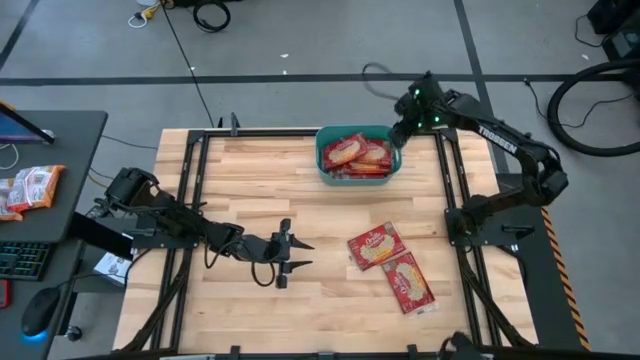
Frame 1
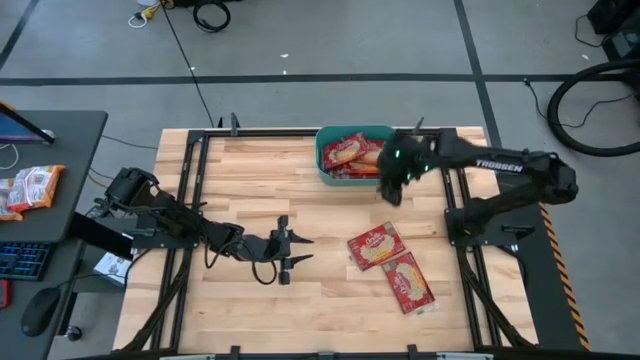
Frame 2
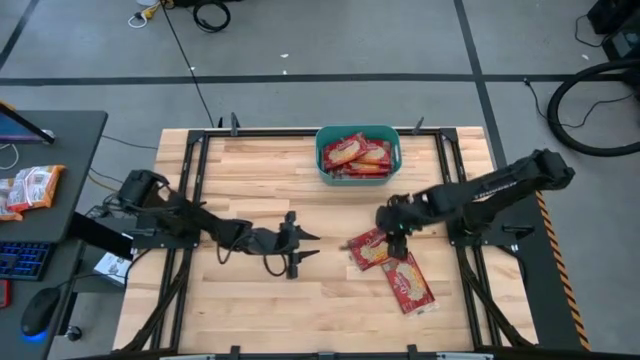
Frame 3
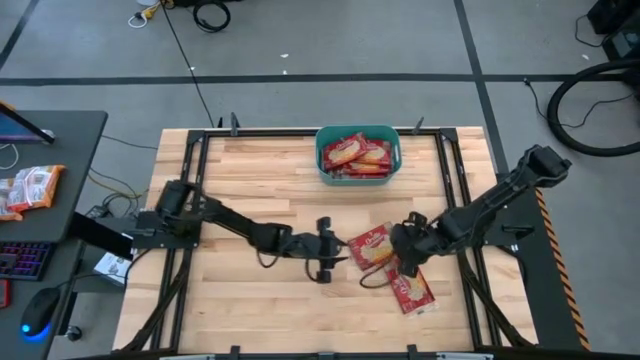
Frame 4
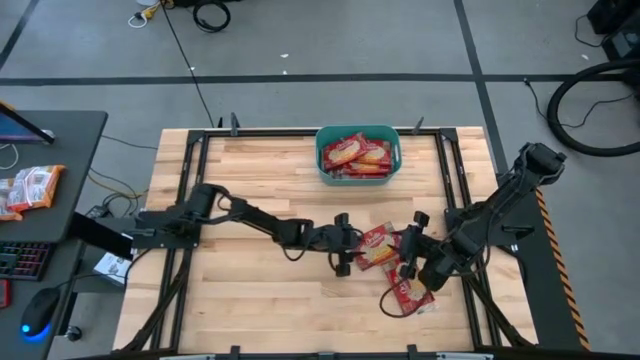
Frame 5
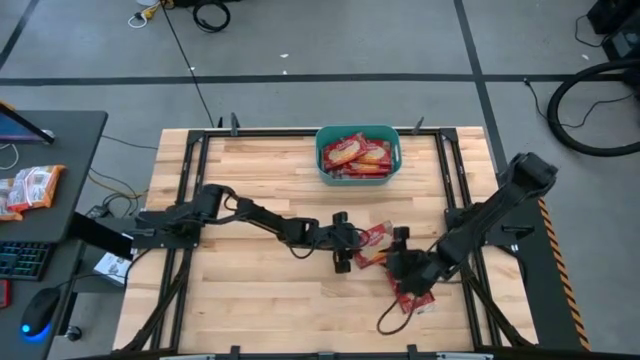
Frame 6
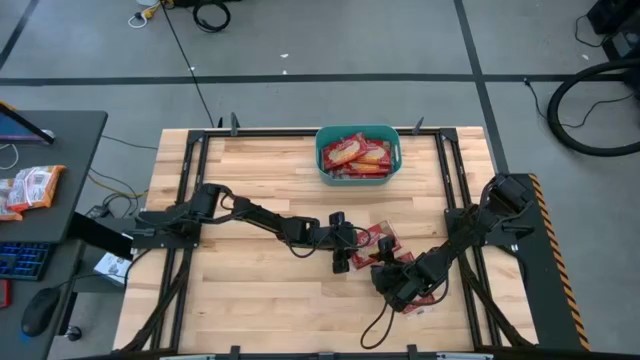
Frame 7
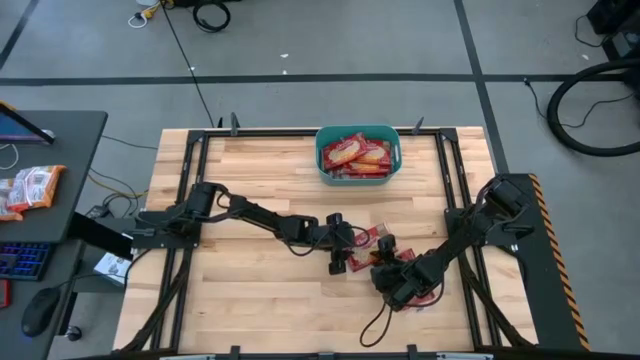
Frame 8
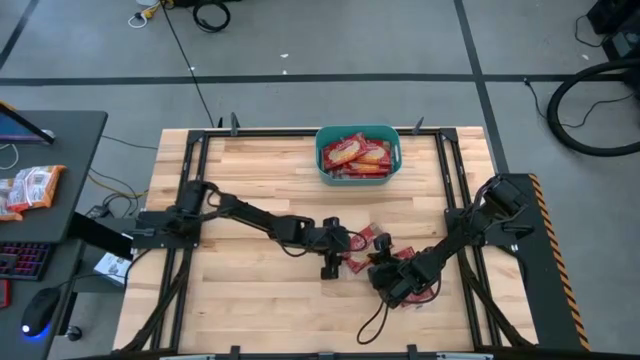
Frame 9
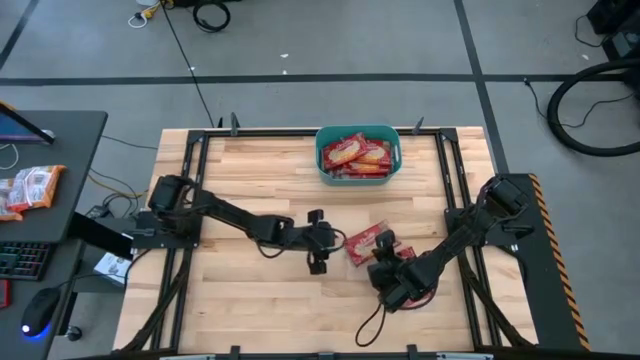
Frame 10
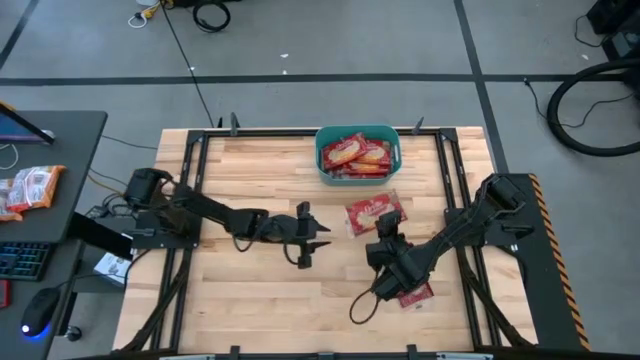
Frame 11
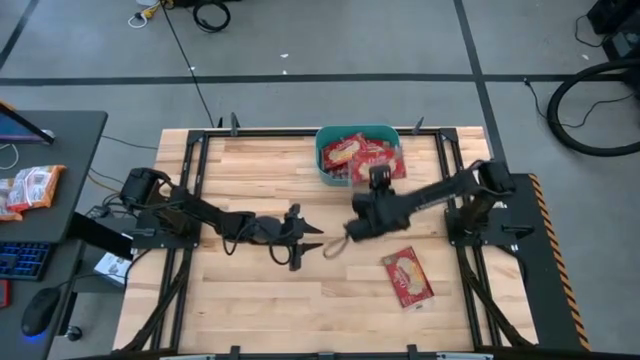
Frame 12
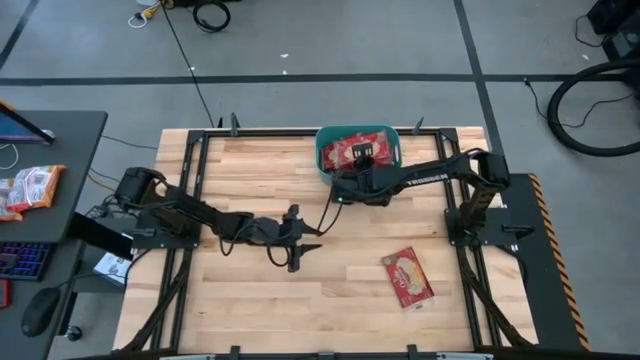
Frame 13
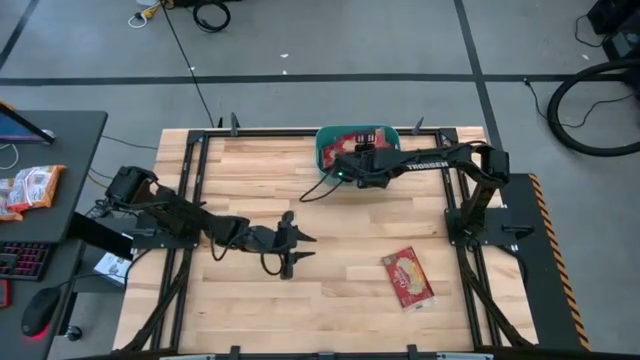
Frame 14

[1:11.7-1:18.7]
Task: Sort popcorn bags into baskets
Put the red popcorn bag into the blue bin

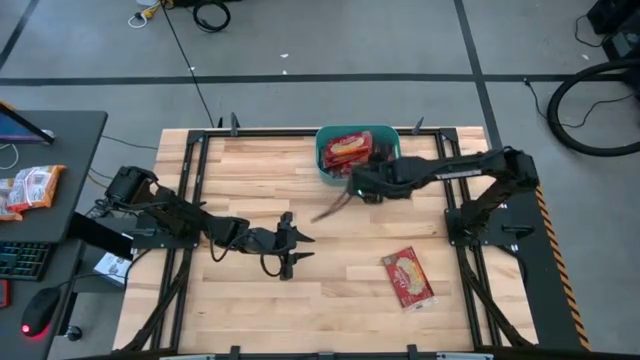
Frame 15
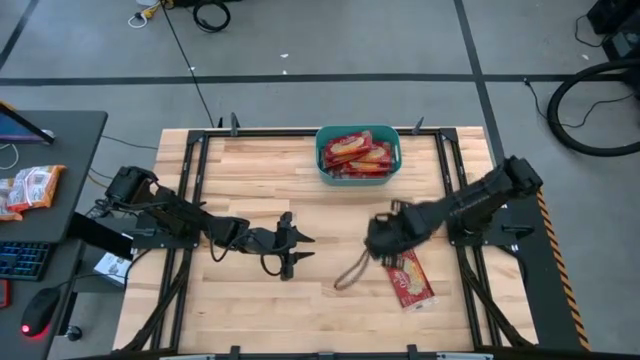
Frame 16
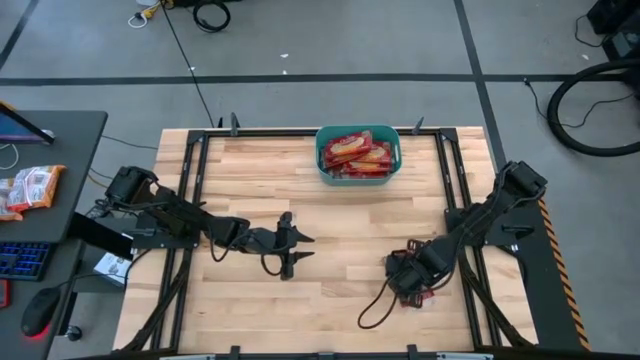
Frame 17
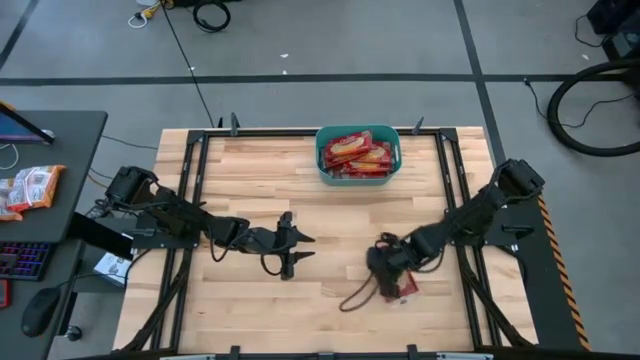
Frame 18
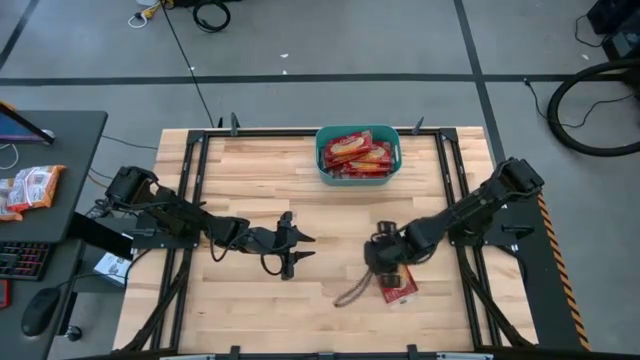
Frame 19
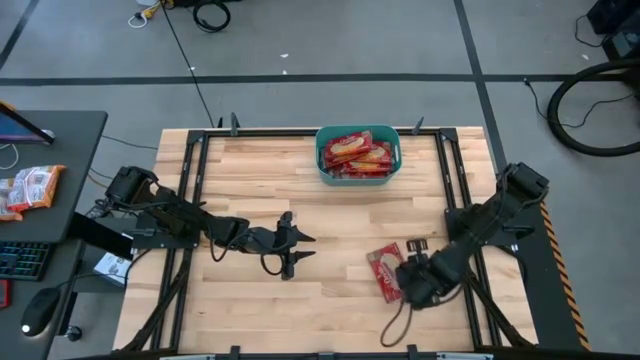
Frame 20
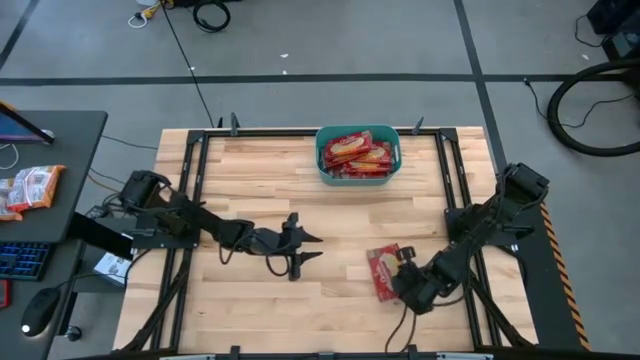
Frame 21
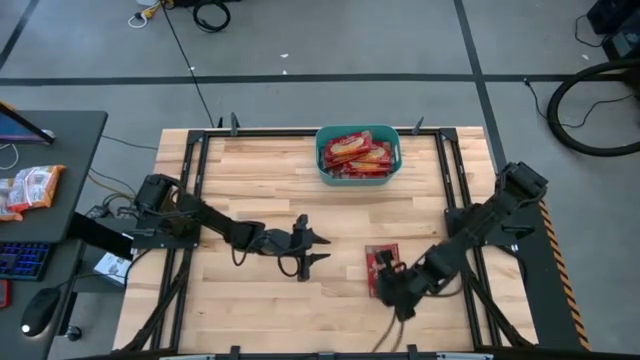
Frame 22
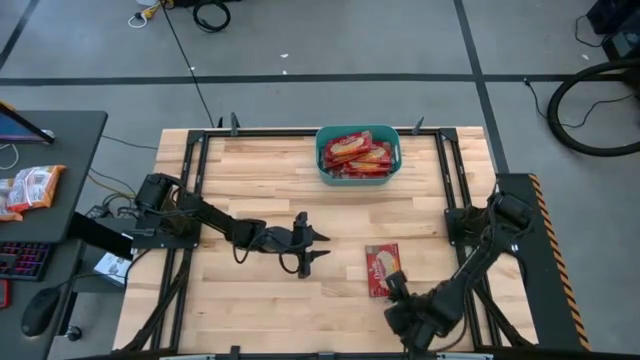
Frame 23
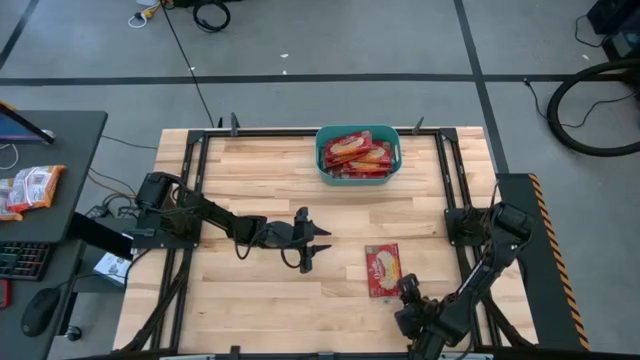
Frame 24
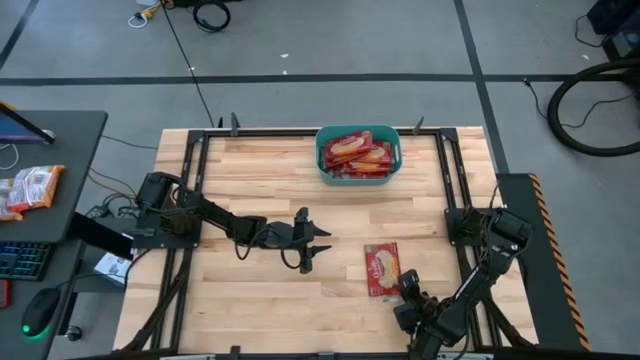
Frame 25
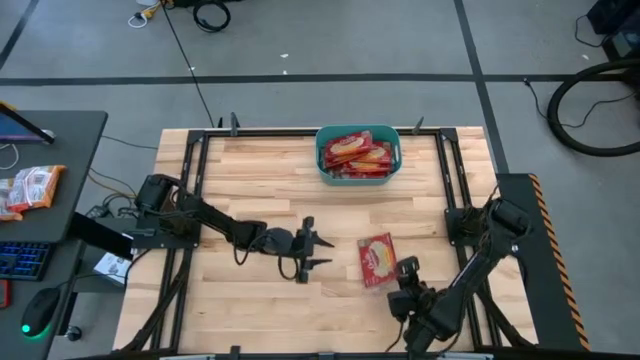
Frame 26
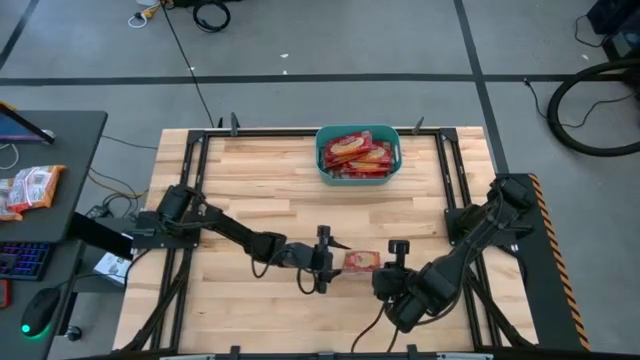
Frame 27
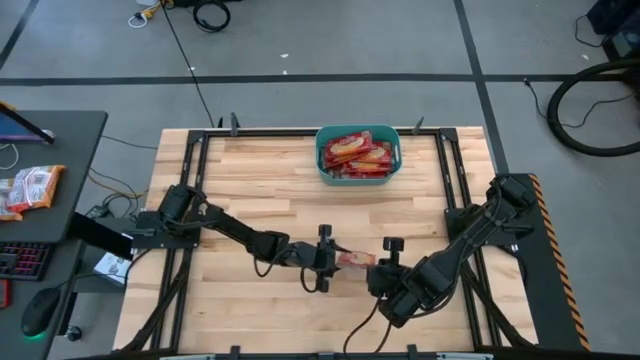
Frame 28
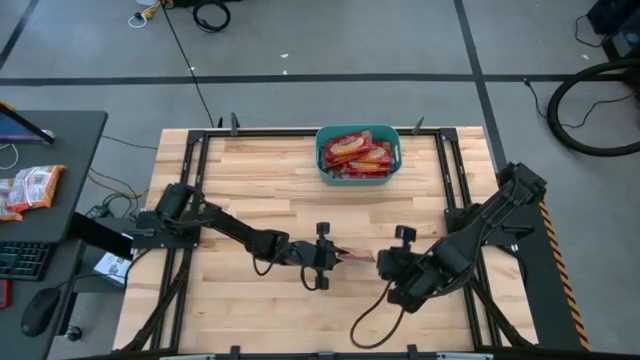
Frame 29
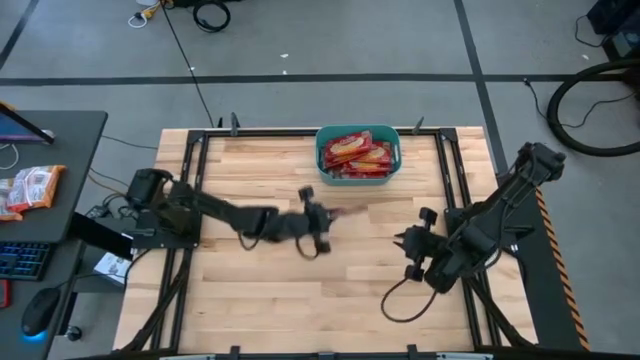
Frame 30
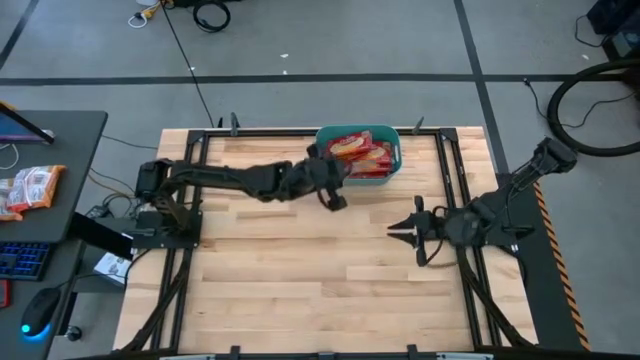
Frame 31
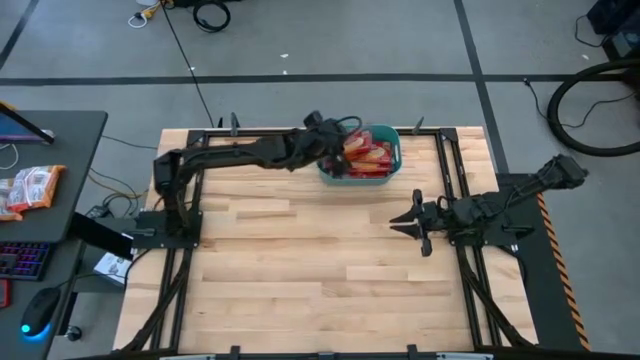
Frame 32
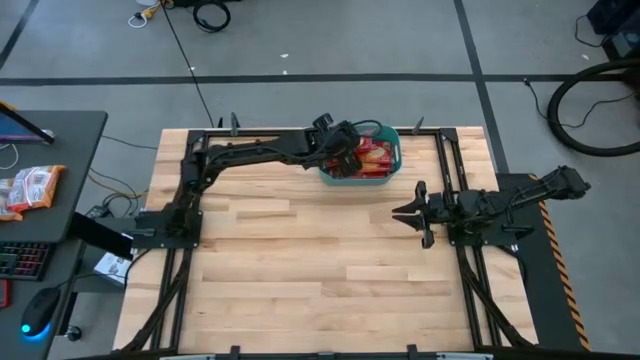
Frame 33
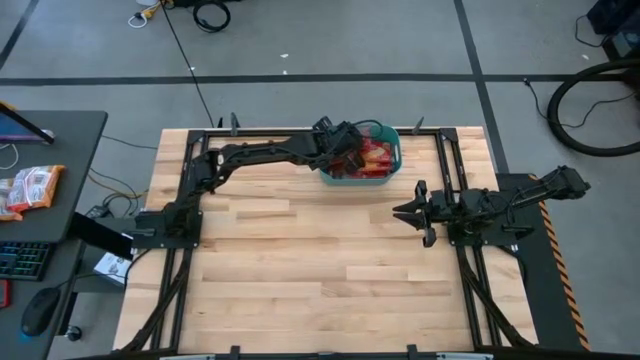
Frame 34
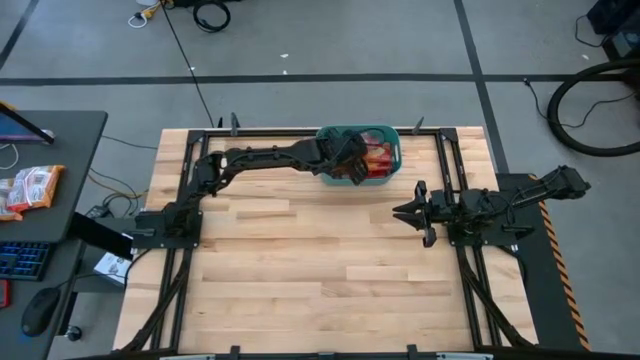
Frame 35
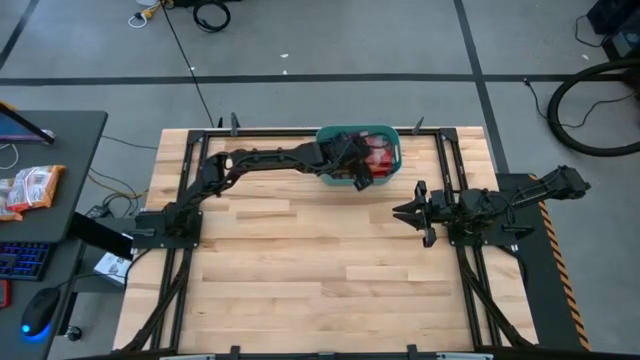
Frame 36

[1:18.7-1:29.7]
Put the red popcorn bag into the blue bin

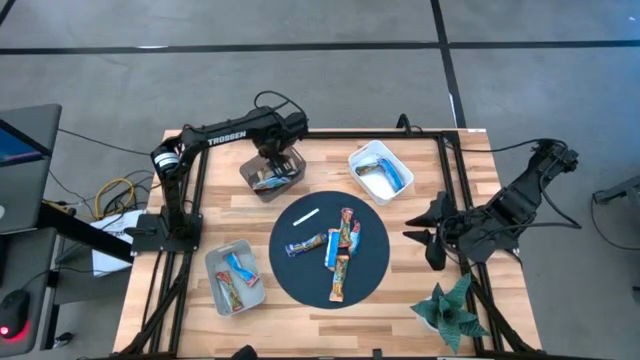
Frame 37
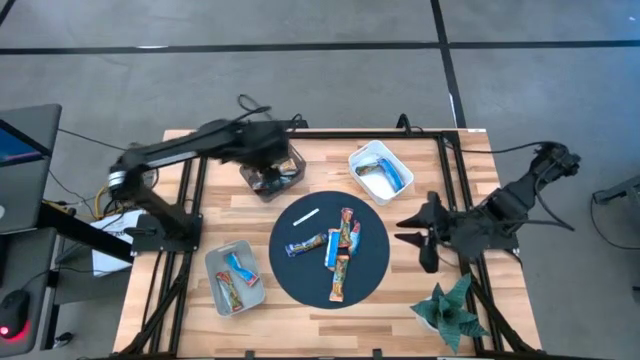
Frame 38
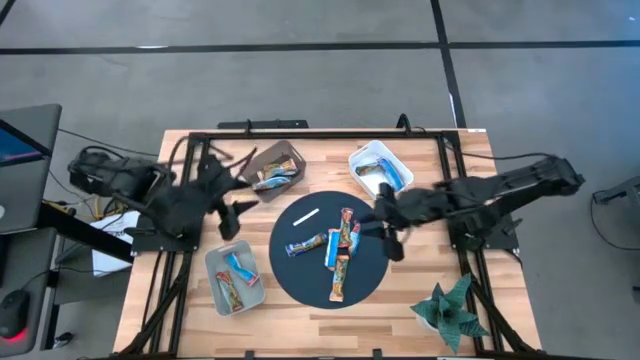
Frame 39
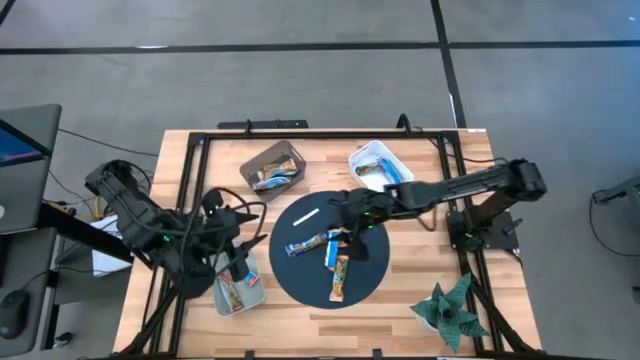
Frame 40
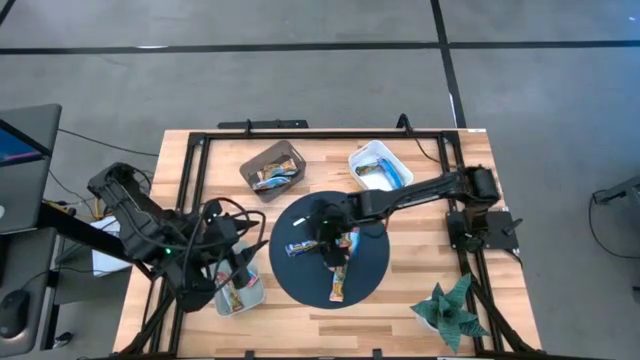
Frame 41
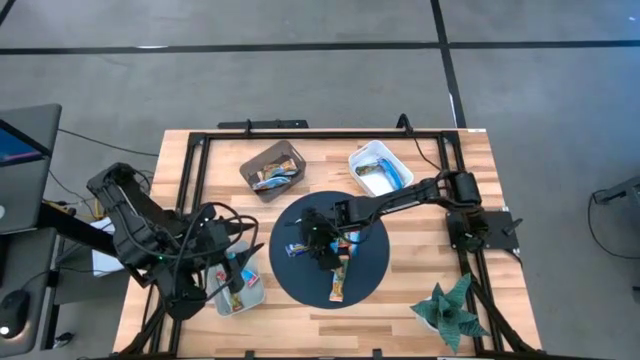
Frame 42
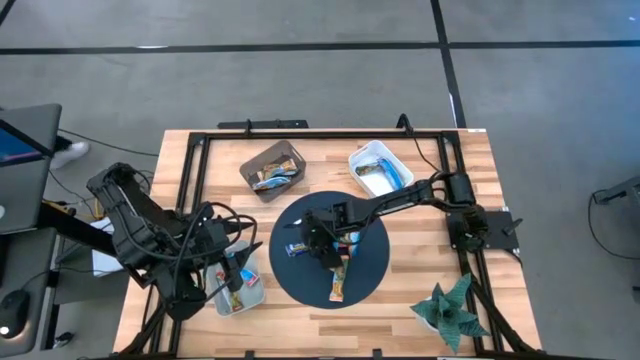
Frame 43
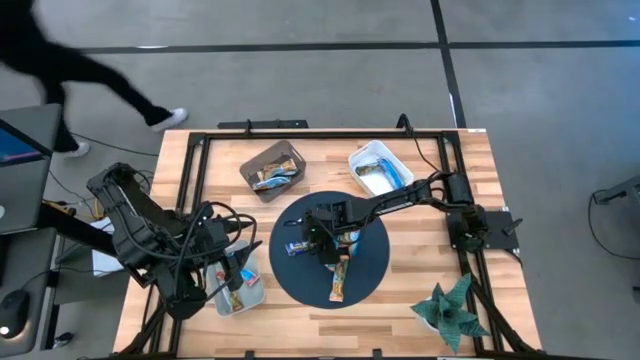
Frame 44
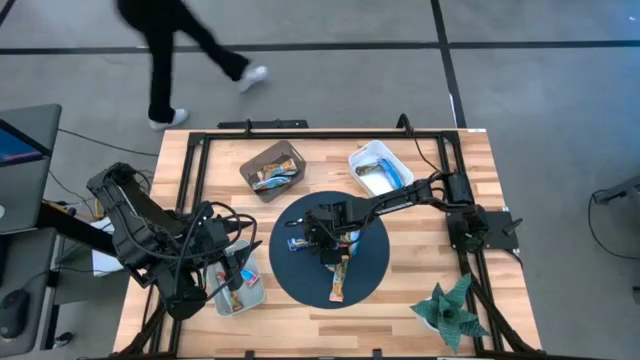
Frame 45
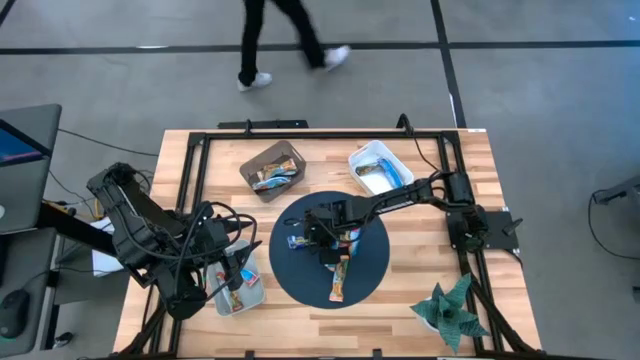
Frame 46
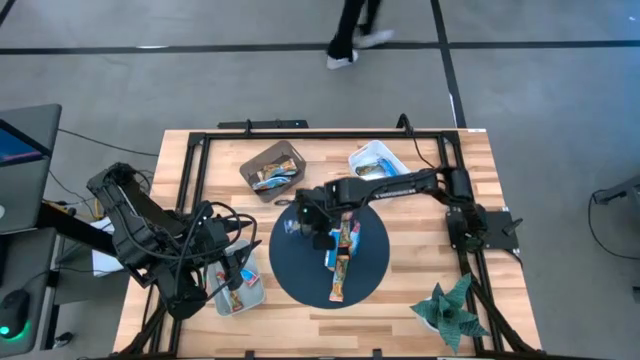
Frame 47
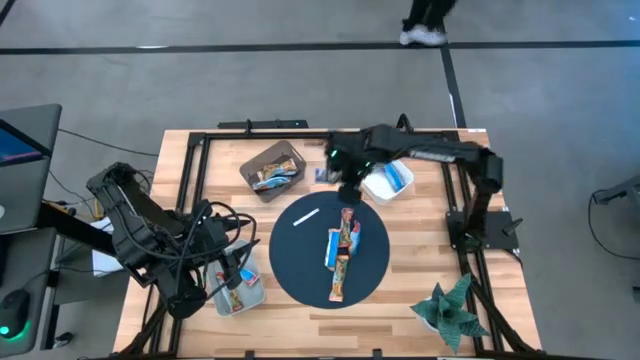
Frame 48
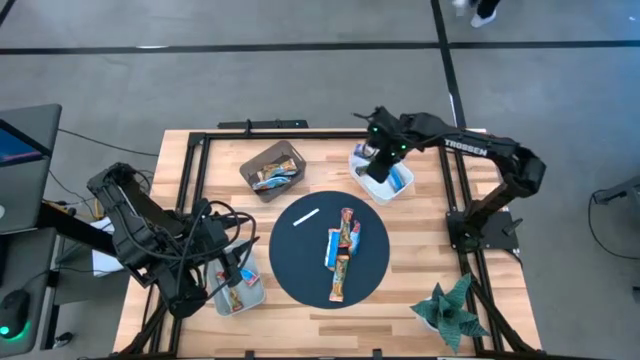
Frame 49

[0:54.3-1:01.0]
Task: Pick and place Granola Bars by type
Put the blue granola bar into the white bin
